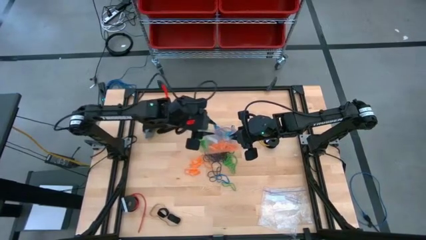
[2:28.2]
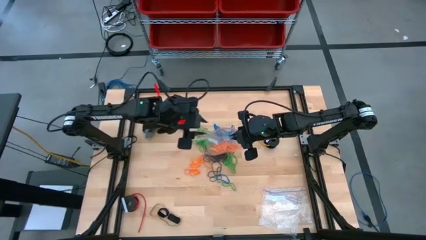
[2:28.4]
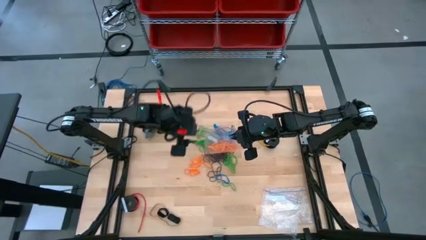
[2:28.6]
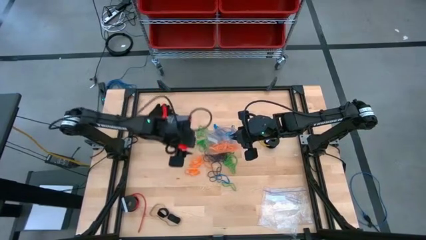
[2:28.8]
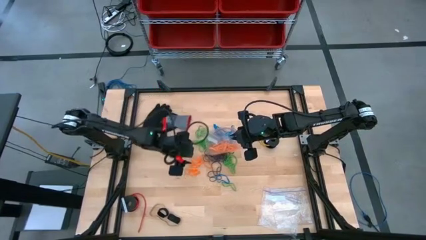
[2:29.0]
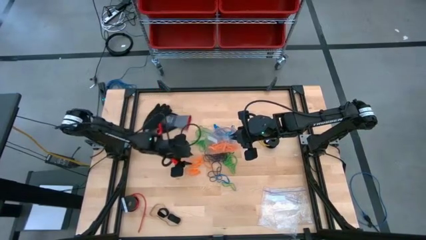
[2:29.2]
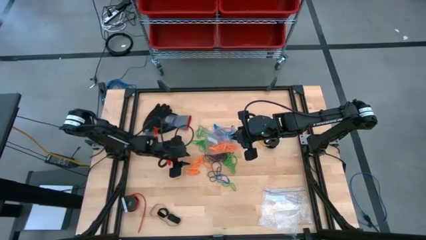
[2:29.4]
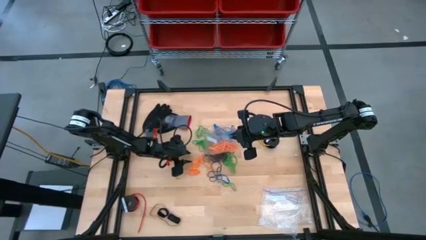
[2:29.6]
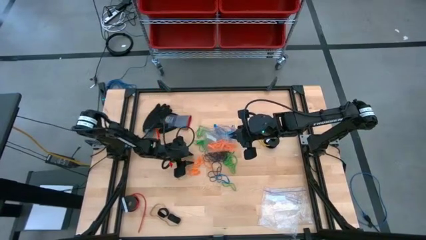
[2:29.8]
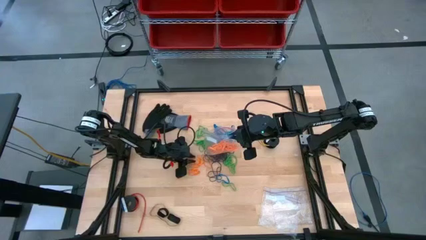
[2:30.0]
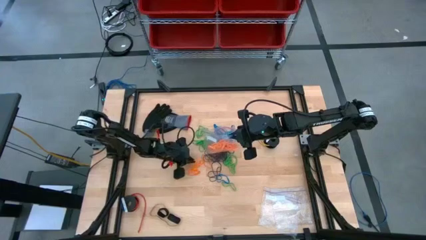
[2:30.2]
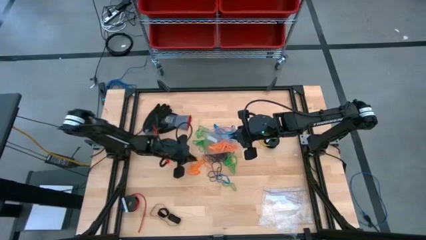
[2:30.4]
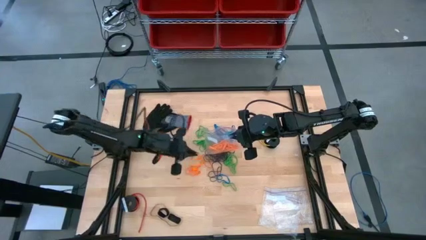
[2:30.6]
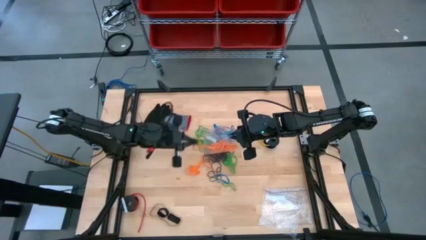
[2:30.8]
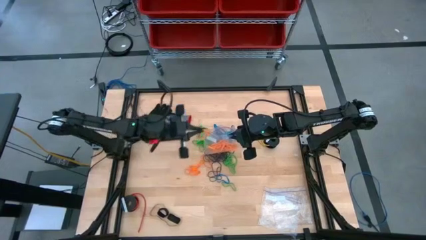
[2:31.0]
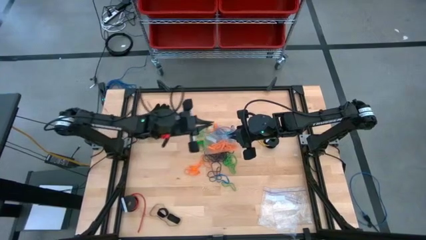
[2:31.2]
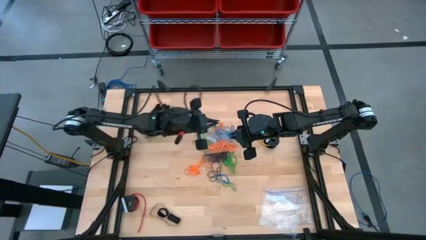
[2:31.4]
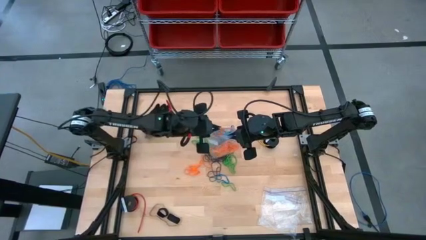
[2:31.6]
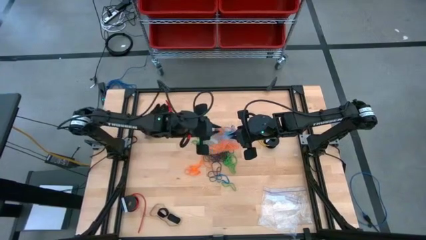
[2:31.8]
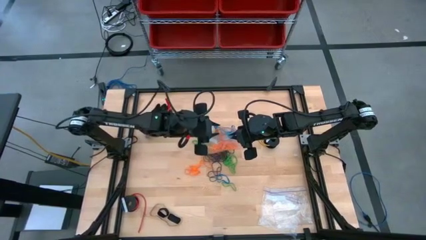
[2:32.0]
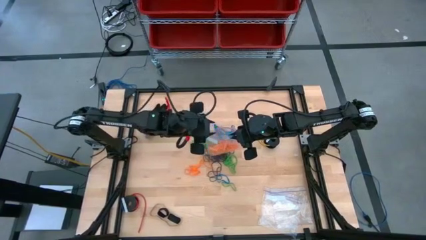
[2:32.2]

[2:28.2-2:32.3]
Task: Sort rubber bands
Put the orange rubber band into the transparent zip bag

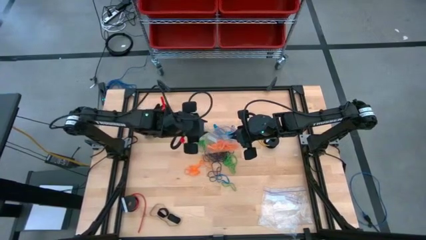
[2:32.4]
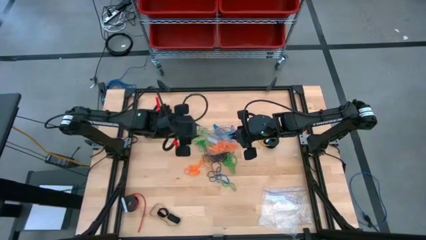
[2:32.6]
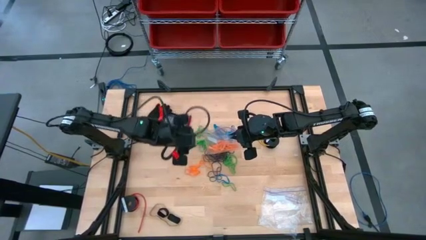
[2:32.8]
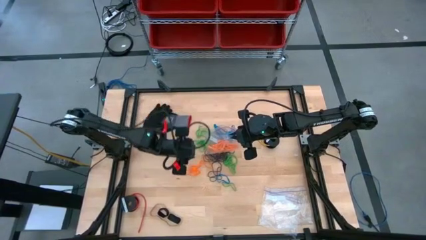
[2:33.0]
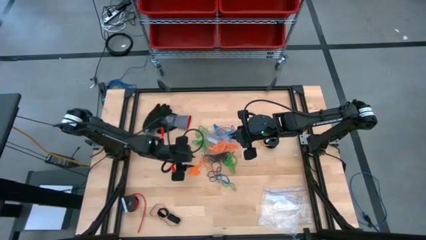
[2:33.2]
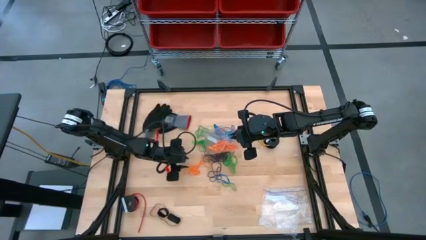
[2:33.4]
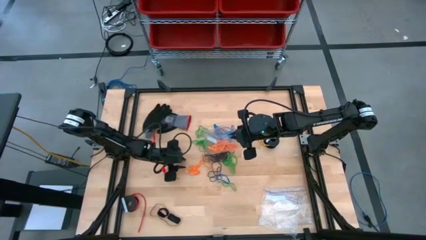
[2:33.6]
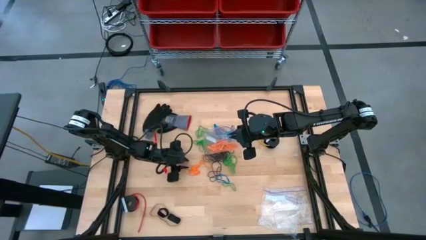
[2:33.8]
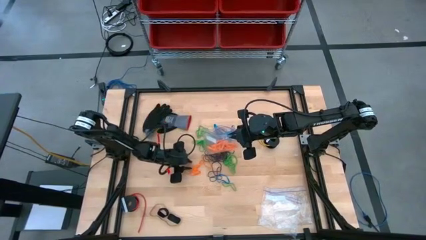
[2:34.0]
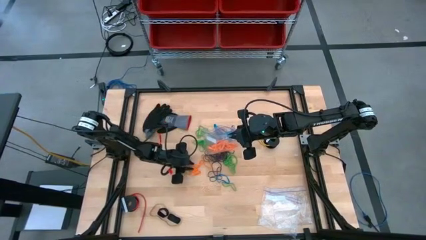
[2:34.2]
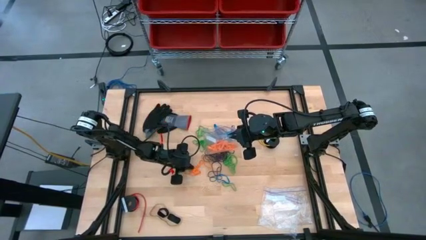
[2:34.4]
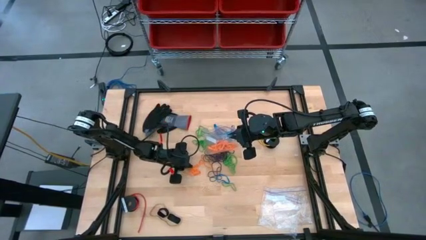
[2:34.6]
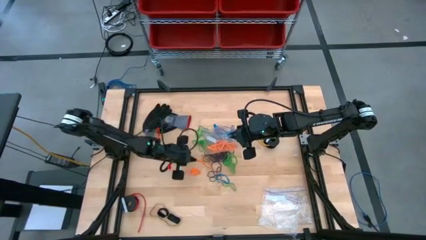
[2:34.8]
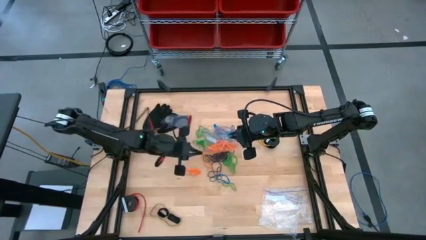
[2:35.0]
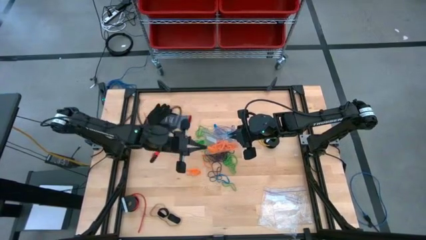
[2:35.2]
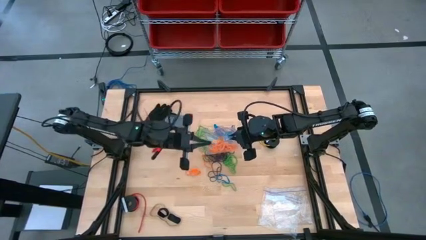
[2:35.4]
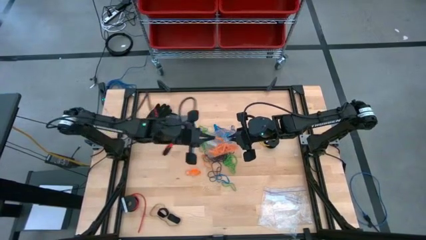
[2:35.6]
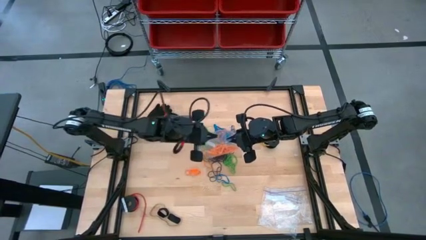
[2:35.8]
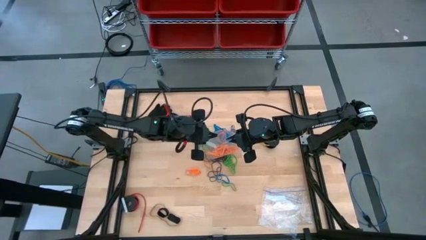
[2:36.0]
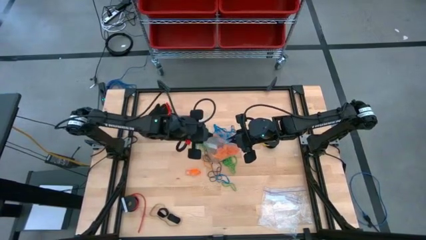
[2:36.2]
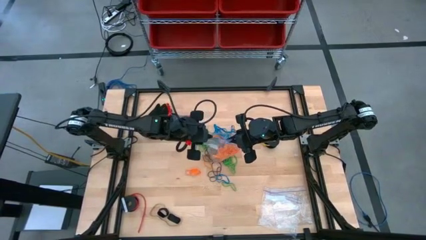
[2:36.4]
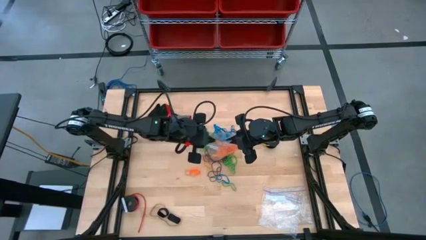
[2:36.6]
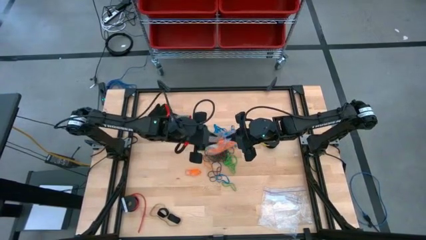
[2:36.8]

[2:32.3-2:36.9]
Put the orange rubber band into the transparent zip bag

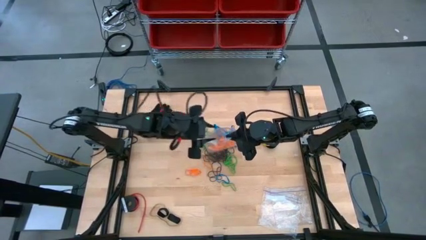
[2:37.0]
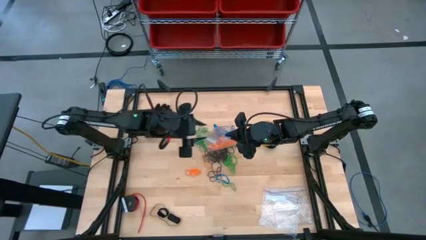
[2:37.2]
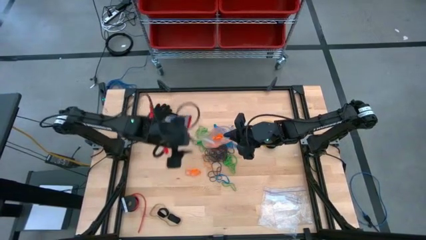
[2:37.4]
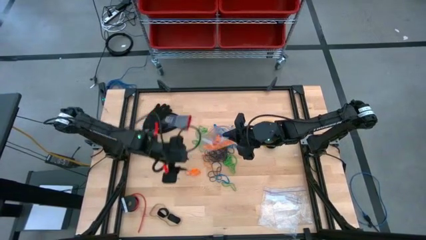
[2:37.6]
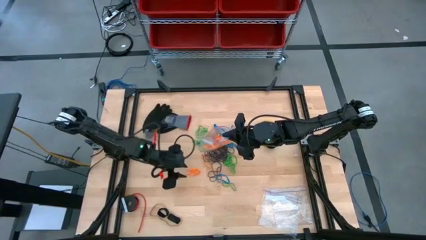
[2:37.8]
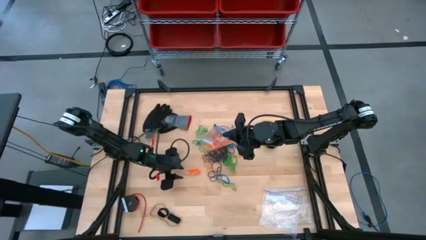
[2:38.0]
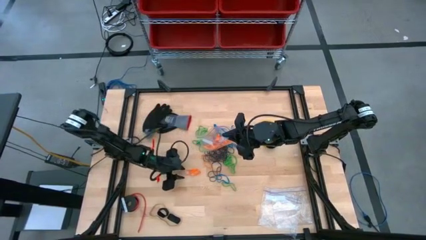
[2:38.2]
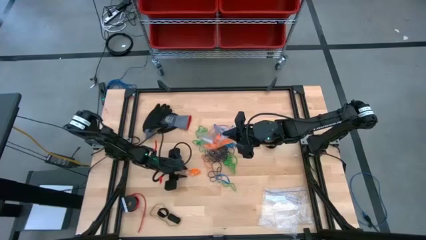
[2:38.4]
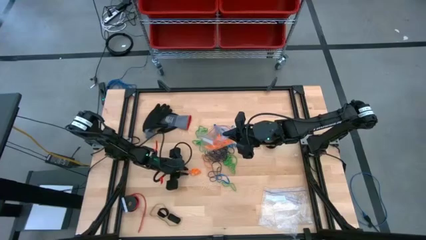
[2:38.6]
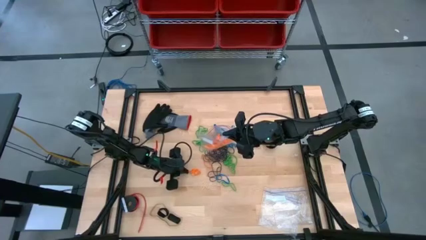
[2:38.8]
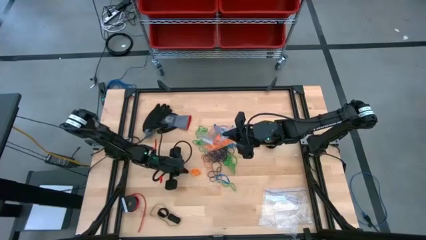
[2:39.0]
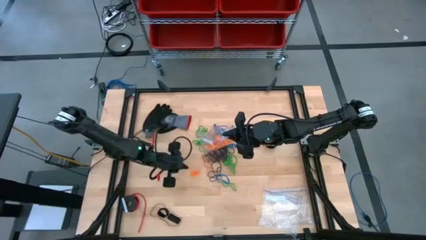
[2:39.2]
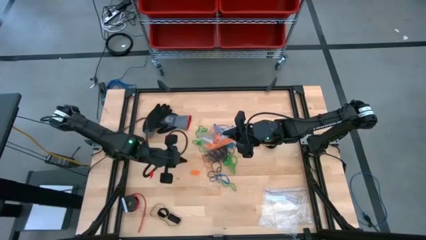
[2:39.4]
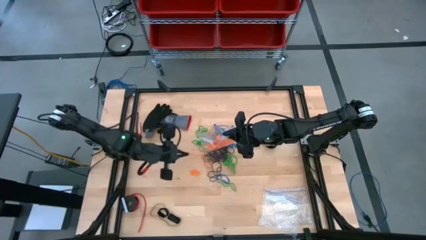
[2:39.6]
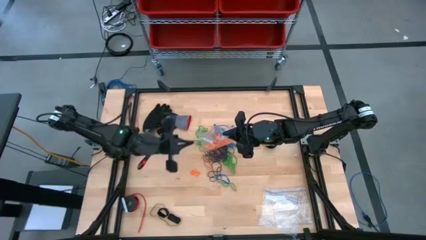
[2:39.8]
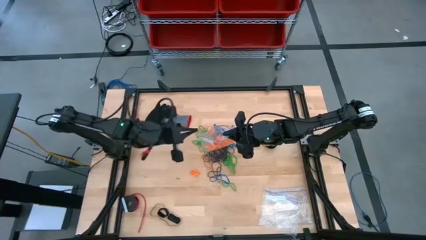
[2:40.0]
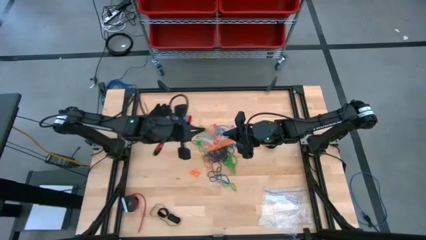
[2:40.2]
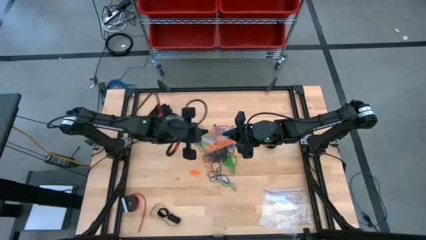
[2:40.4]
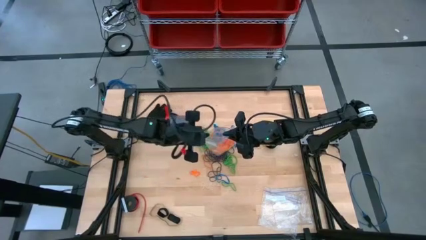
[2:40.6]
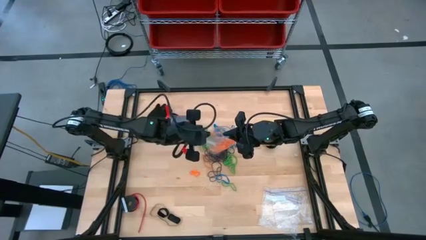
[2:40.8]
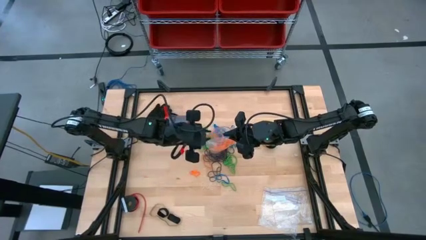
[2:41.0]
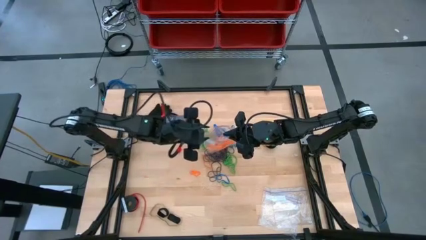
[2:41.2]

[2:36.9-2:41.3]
Put the orange rubber band into the transparent zip bag

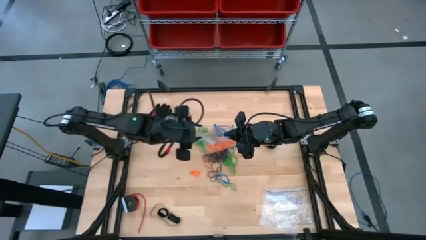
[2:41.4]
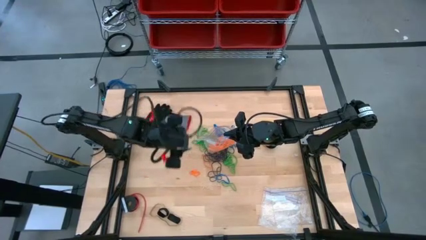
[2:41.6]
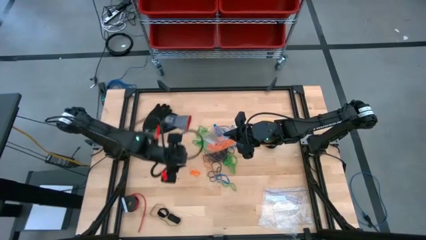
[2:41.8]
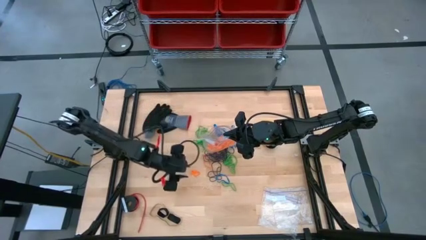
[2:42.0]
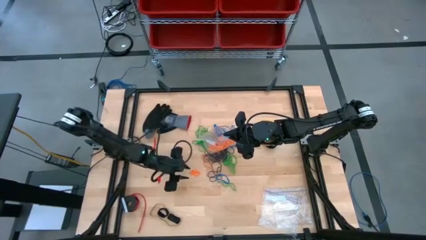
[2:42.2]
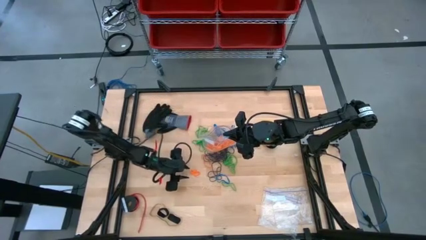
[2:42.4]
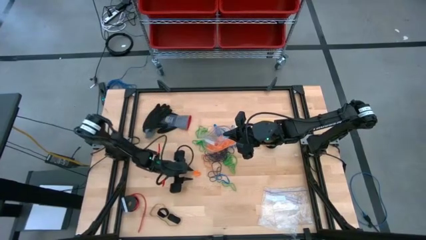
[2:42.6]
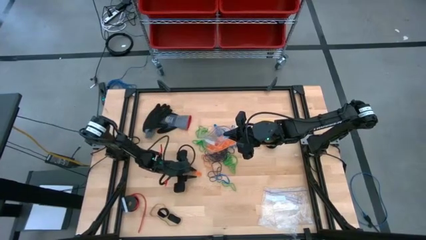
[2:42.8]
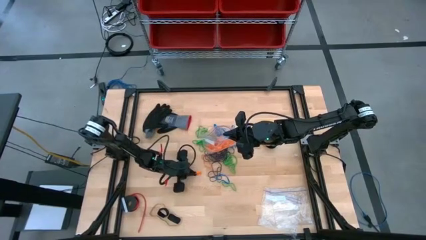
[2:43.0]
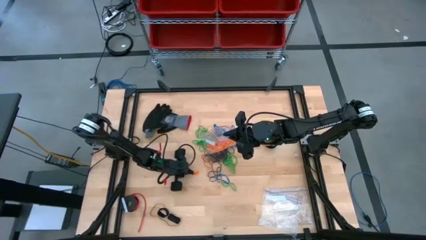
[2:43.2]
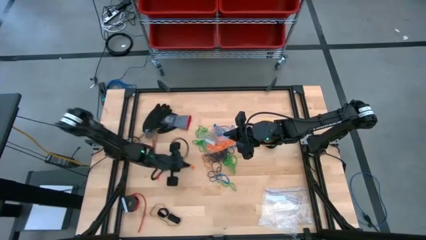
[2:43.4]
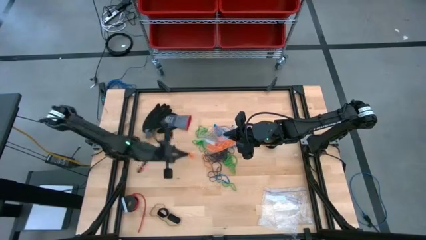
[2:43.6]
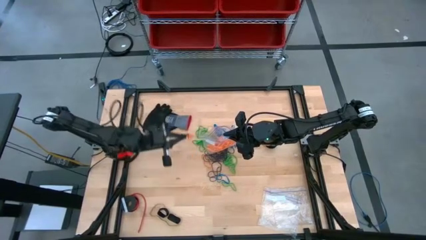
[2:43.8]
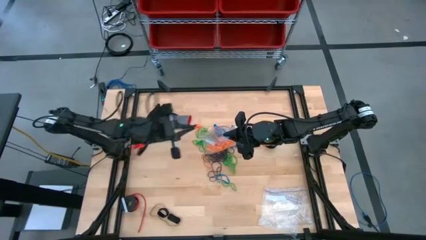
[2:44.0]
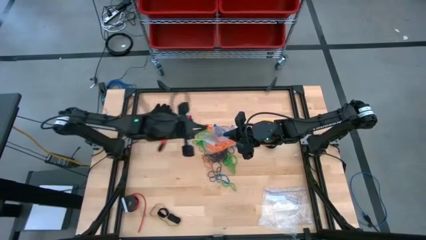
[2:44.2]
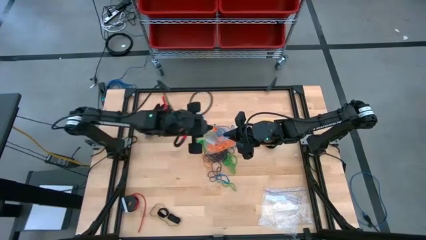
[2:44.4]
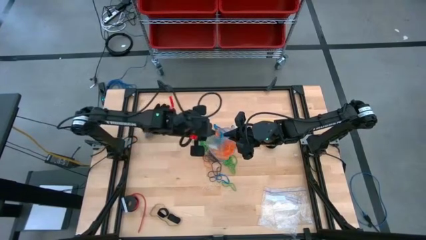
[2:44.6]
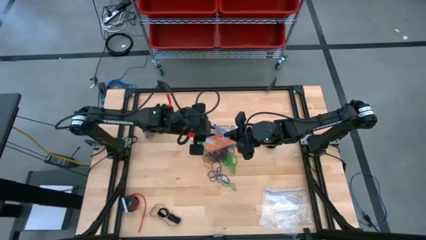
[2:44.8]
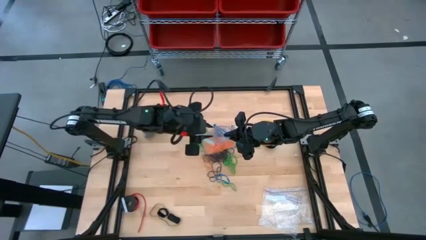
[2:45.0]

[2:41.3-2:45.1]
Put the orange rubber band into the transparent zip bag
